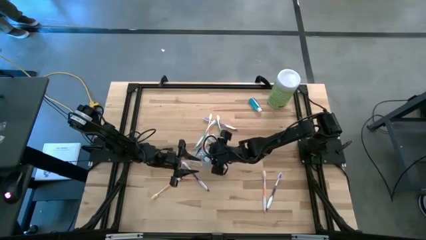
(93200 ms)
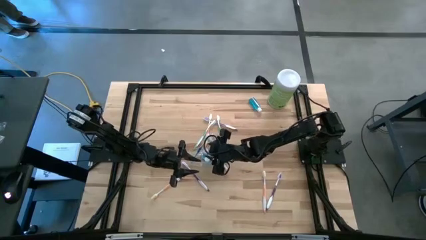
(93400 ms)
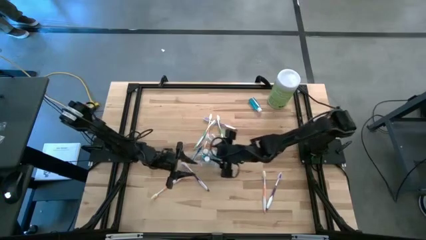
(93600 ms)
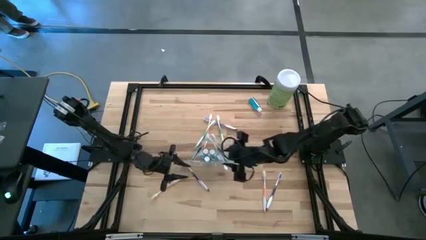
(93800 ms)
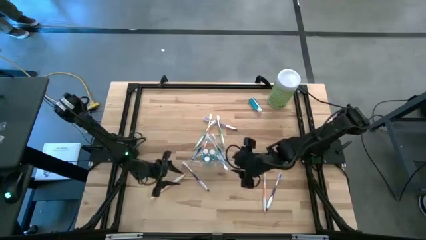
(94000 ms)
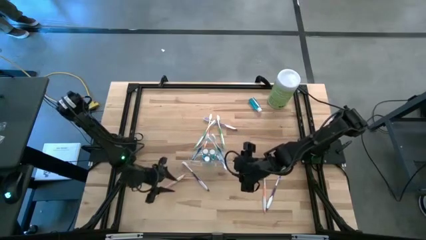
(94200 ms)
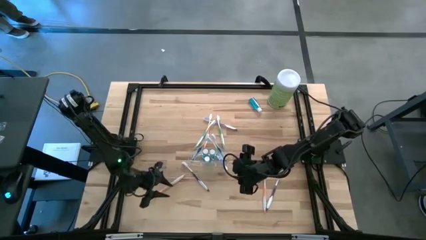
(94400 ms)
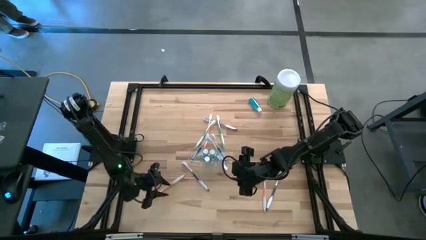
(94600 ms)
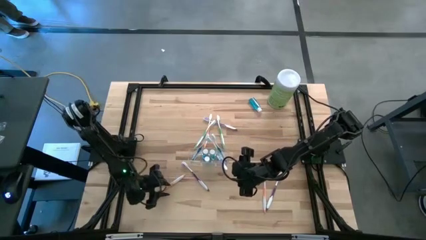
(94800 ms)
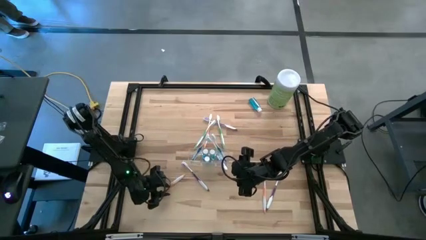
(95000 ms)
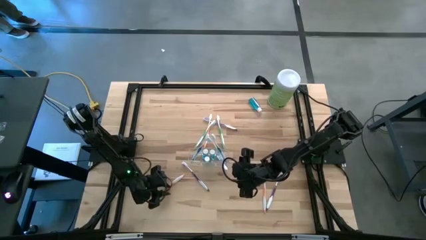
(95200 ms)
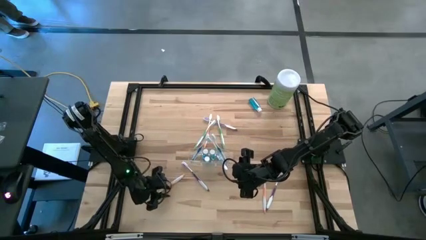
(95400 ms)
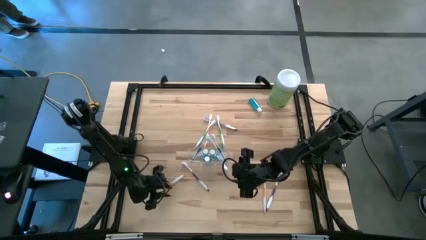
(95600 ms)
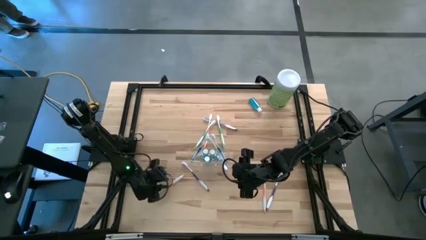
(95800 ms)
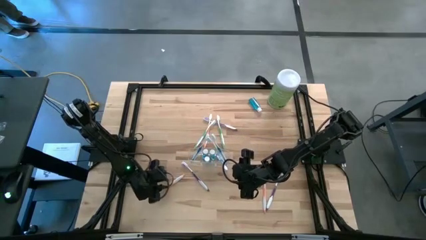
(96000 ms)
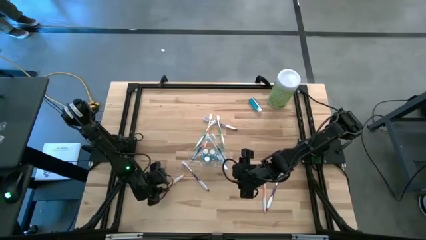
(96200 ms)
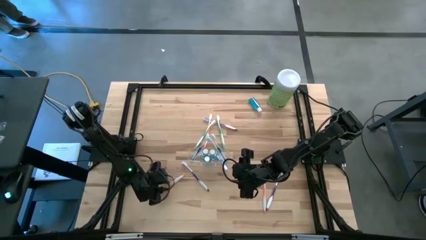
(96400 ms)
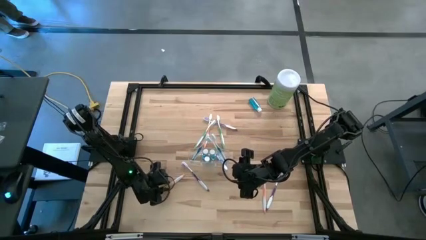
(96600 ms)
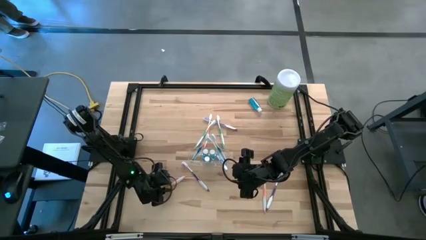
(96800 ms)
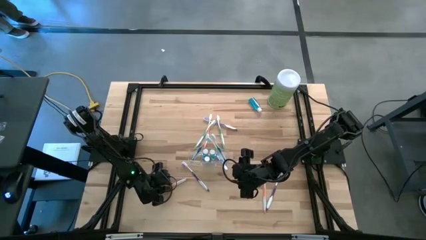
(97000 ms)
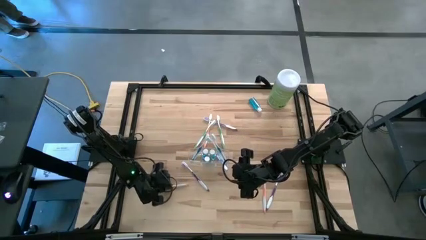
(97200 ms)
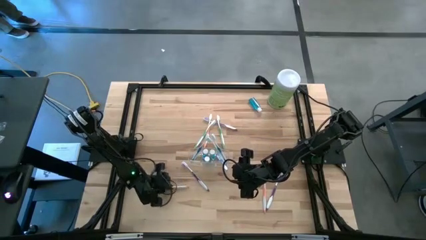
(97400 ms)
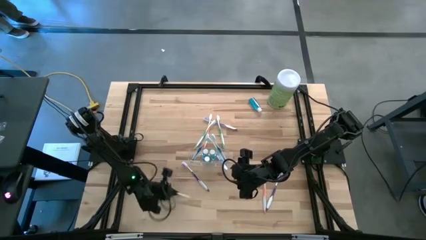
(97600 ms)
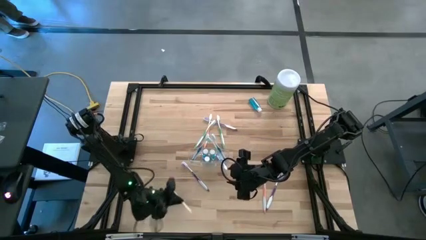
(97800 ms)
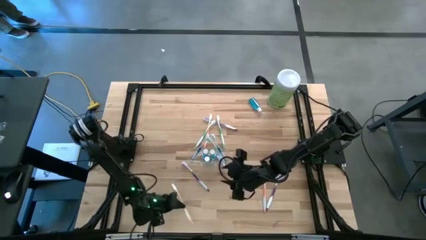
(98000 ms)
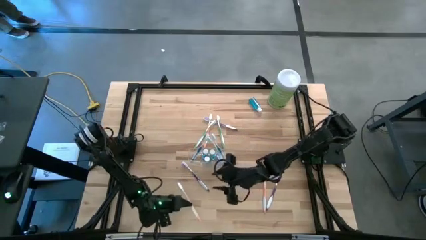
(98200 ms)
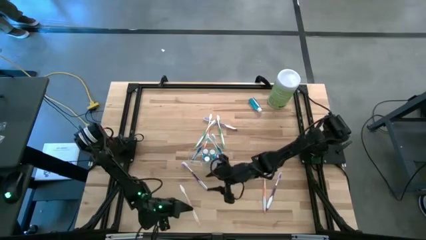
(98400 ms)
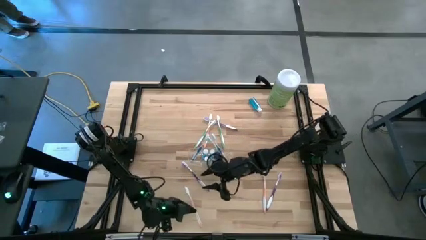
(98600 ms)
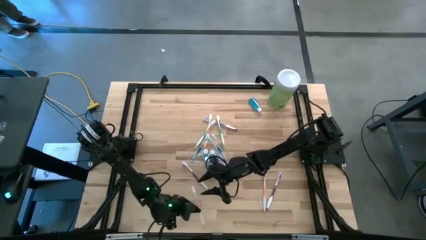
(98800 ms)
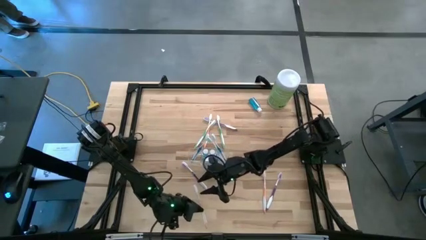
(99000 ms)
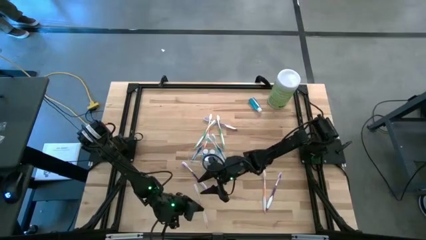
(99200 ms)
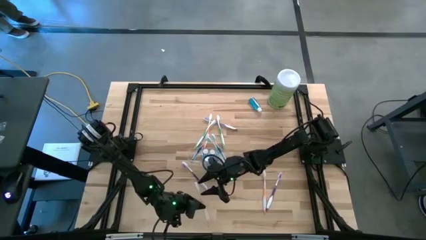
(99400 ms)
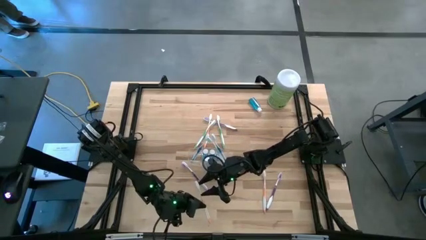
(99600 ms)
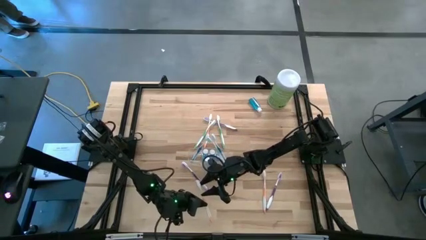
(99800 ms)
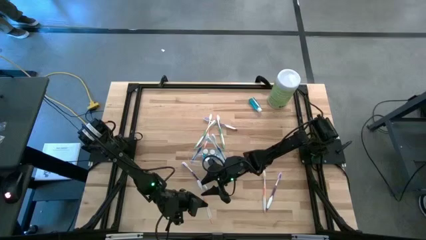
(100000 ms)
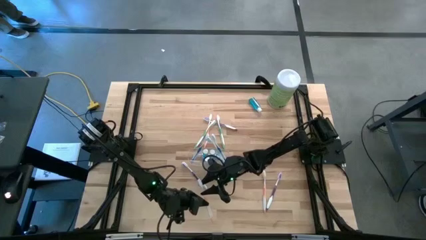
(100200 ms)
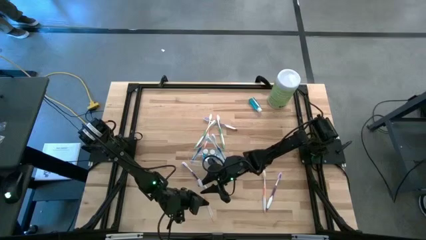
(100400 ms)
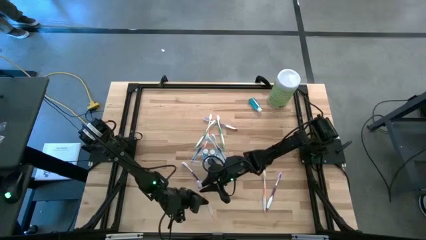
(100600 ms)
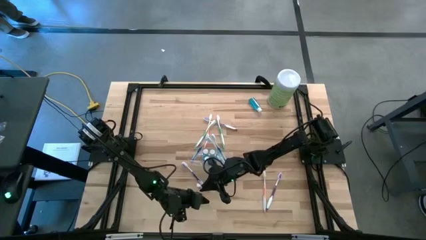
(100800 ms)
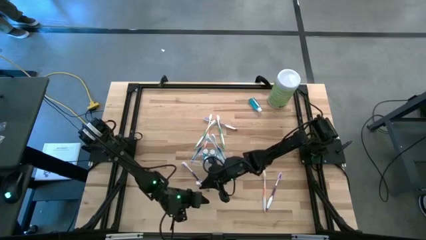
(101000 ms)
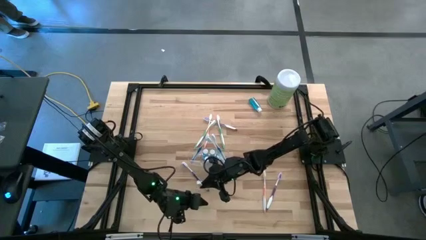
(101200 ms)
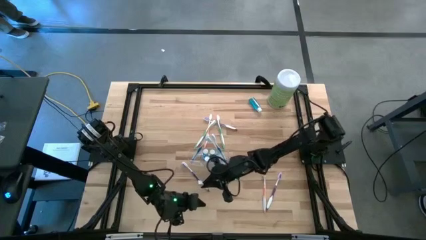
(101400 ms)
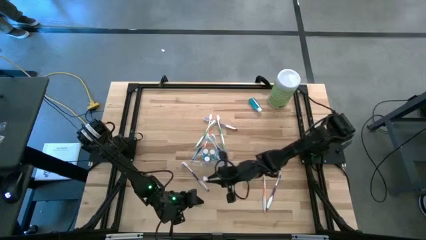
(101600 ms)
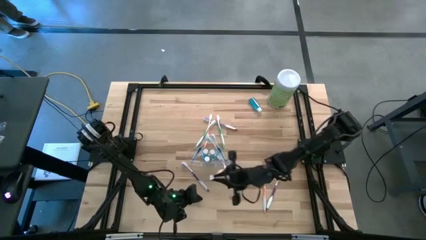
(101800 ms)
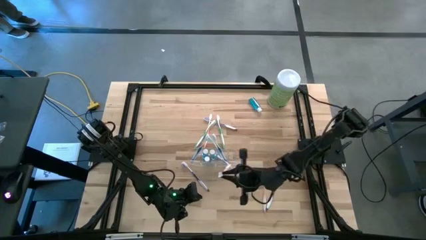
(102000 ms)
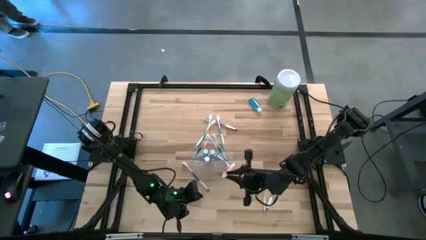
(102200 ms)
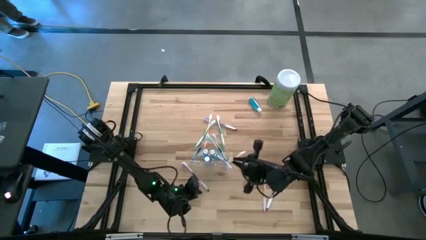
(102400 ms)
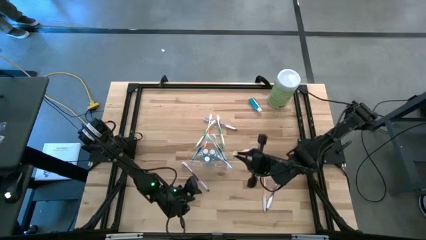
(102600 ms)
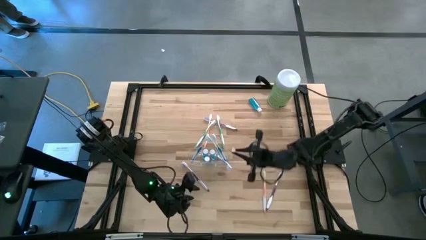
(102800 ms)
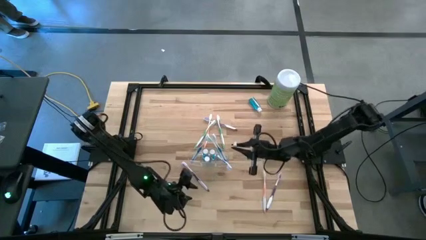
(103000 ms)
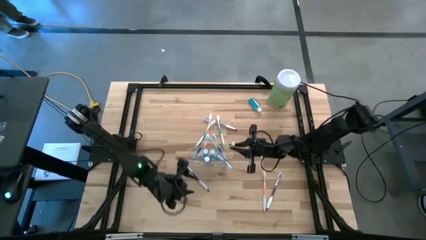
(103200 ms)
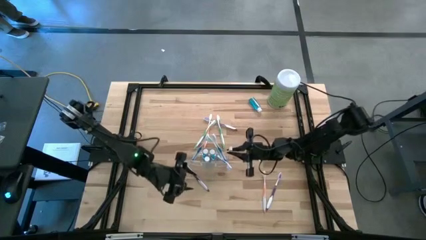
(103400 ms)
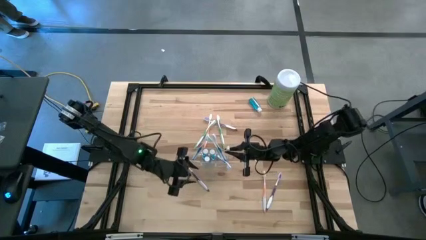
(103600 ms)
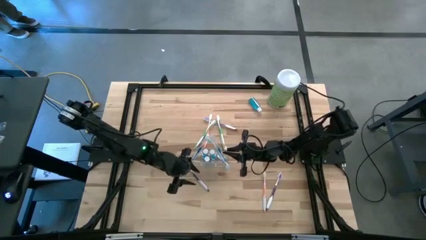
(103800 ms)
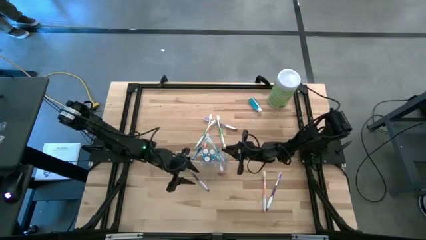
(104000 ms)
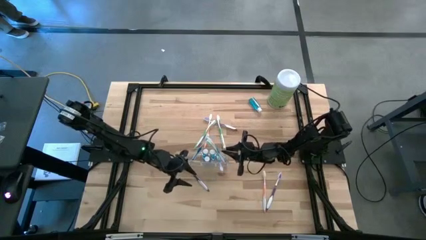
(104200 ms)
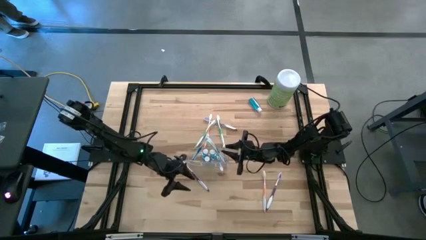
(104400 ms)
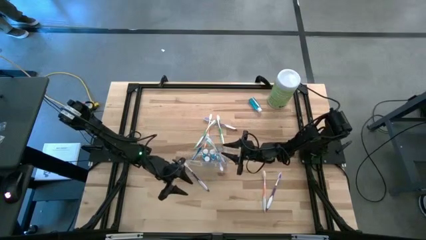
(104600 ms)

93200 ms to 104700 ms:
Task: Pick & Place toothbrushing station
Put the orange toothbrush into the right side of the transparent organizer

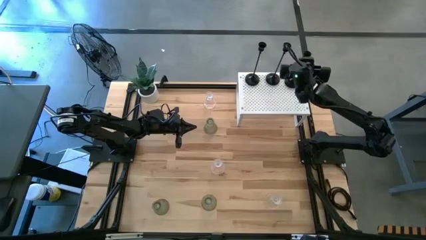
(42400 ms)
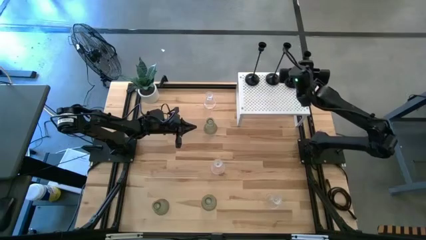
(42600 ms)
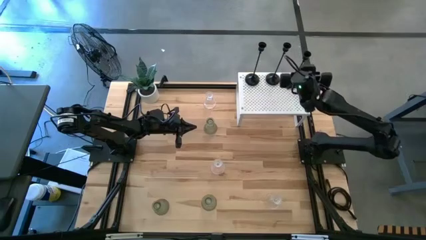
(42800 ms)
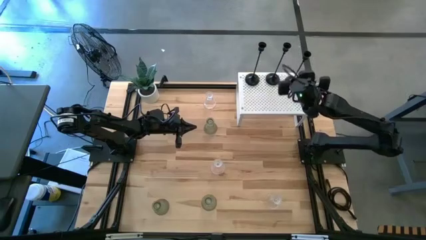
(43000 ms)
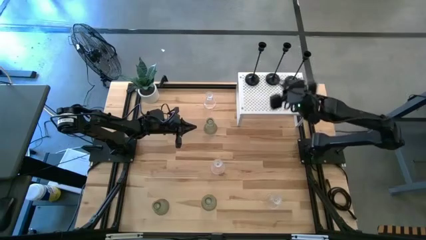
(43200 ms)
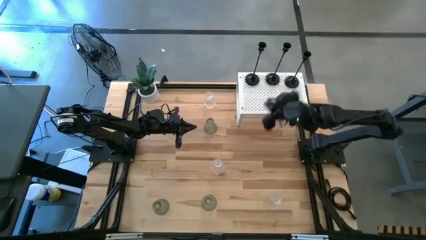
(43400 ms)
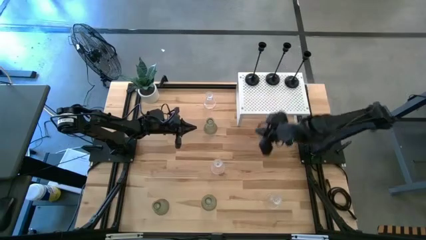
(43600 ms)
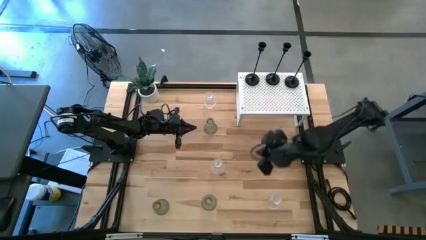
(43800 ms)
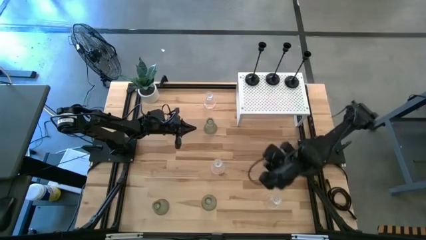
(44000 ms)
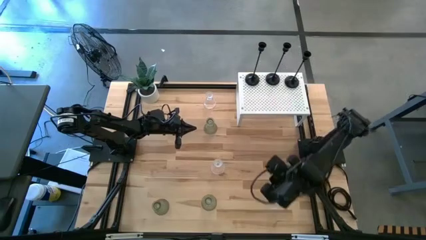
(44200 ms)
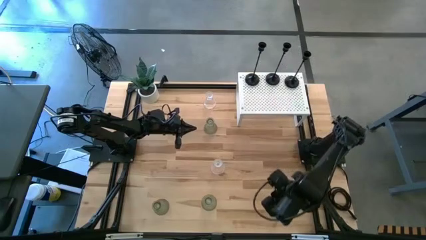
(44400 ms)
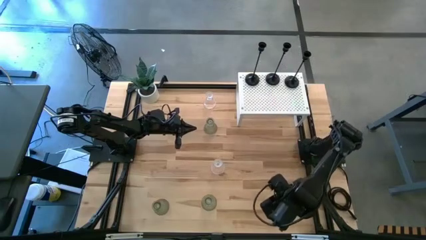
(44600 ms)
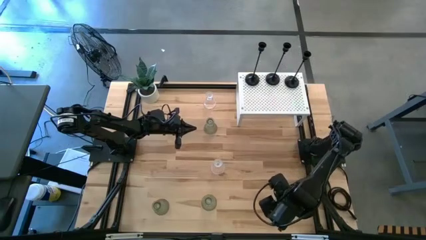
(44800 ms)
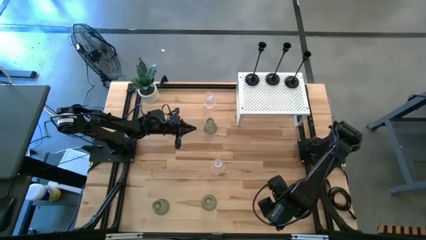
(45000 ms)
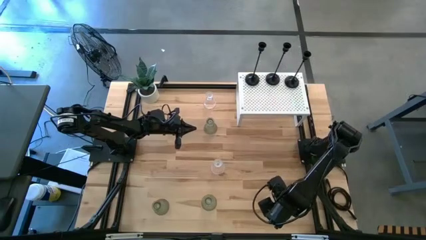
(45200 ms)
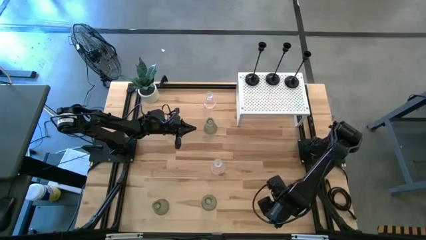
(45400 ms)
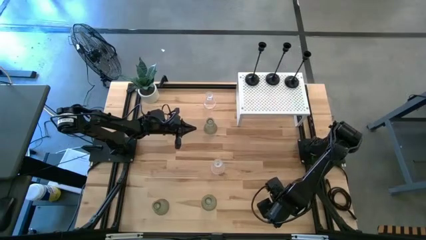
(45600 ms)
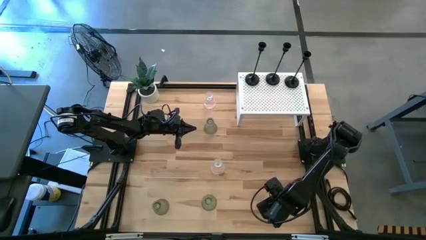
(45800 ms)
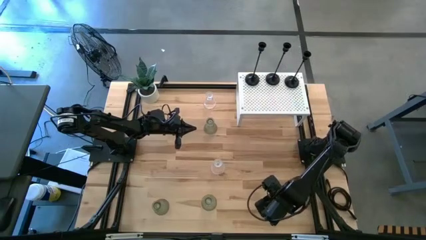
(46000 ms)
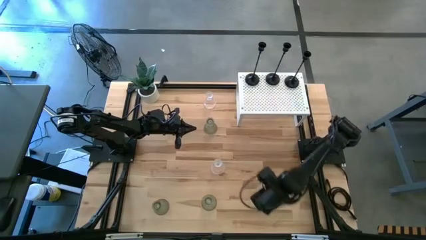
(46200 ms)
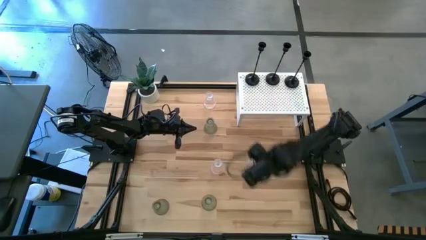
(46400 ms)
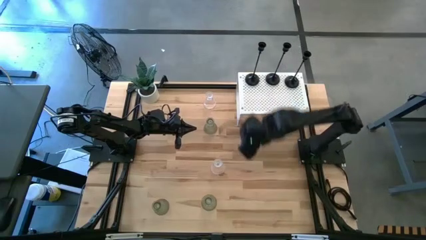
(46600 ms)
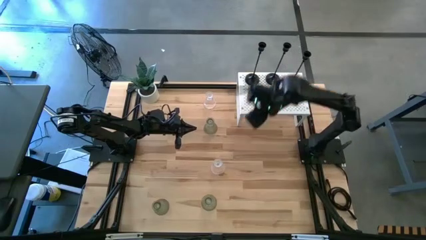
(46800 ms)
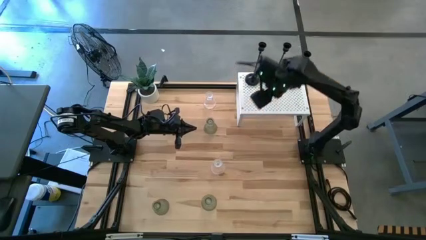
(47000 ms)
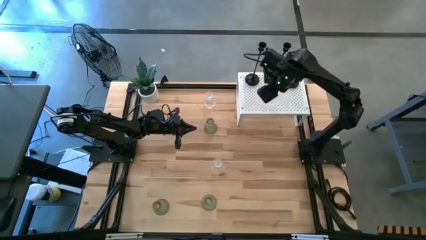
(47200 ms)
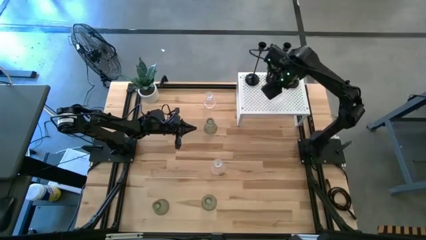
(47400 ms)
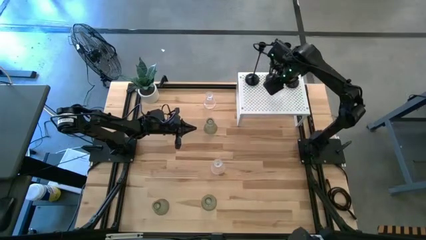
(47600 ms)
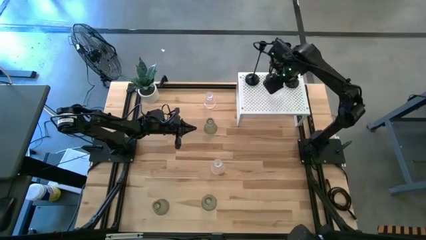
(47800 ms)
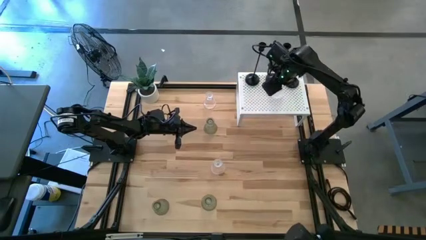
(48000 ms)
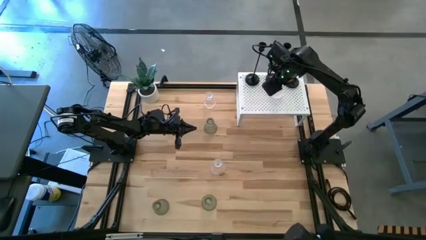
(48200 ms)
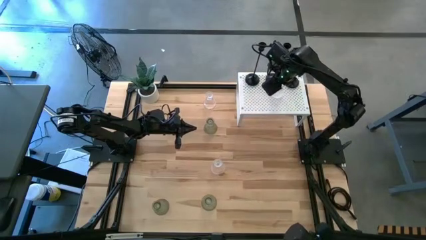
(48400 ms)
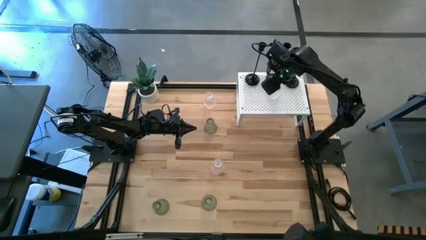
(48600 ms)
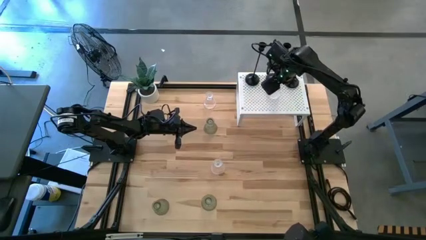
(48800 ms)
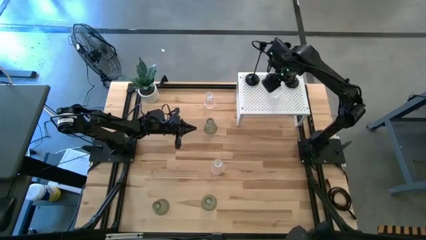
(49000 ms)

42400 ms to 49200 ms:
Task: Pick & Place candle stick holders
Put the bottom transparent glass candle holder on the shelf
